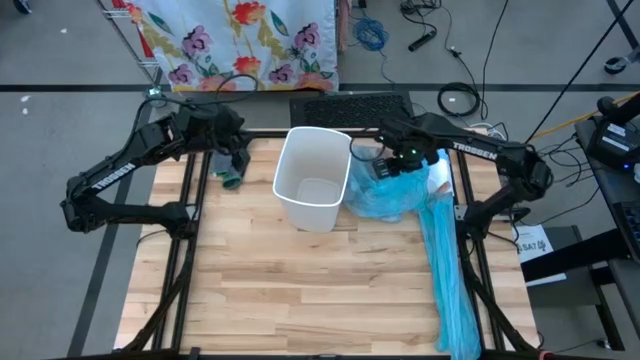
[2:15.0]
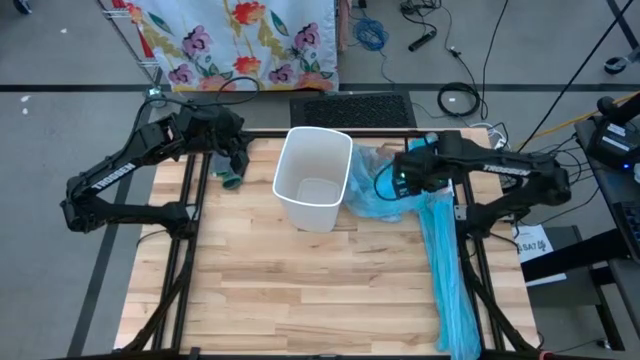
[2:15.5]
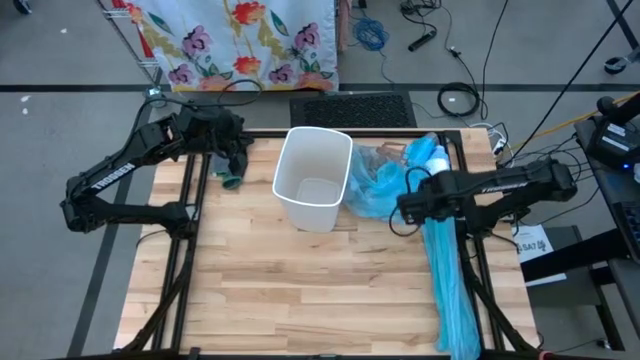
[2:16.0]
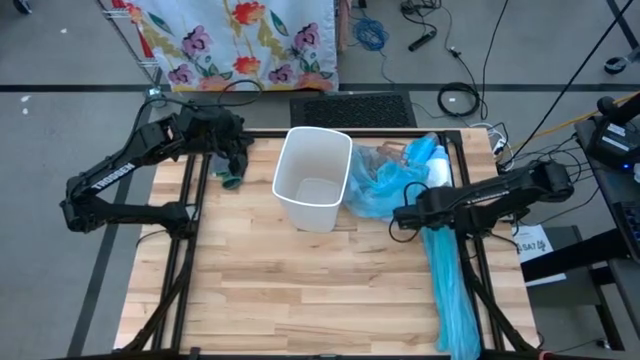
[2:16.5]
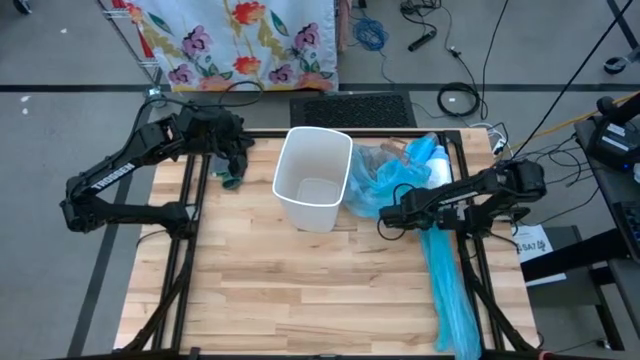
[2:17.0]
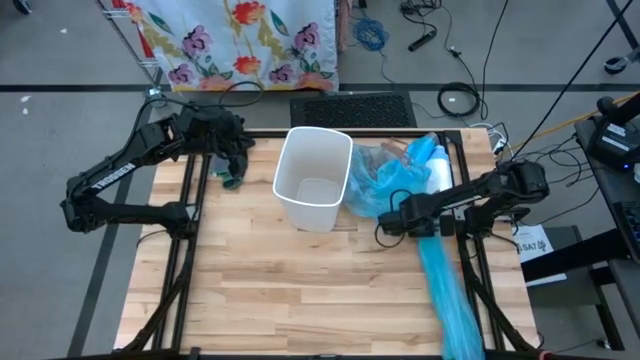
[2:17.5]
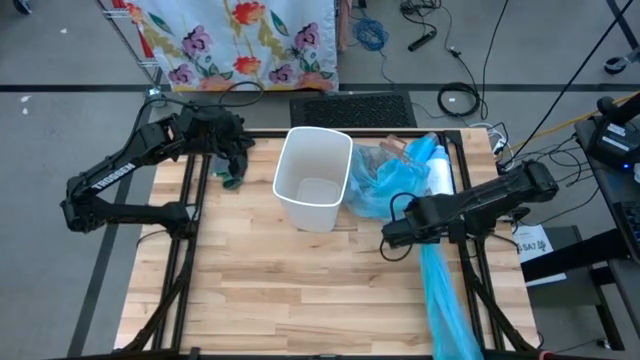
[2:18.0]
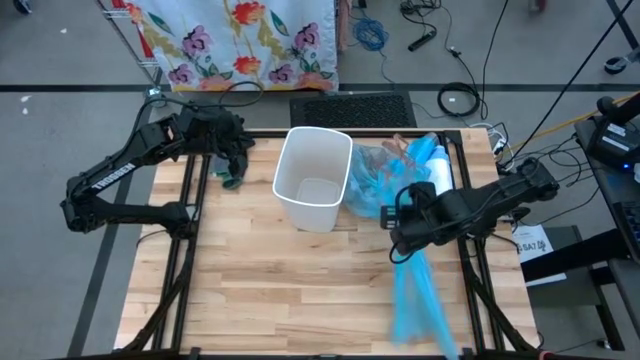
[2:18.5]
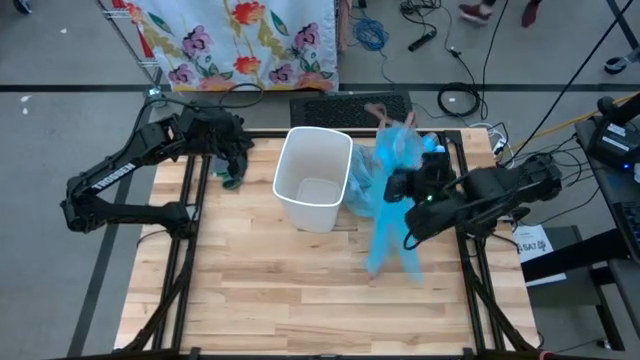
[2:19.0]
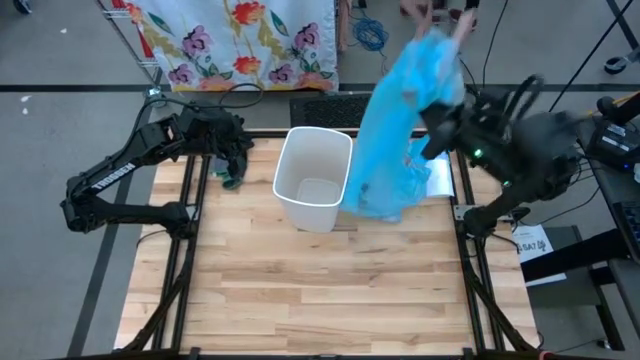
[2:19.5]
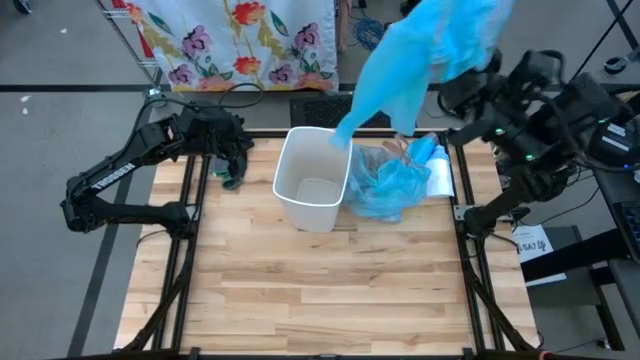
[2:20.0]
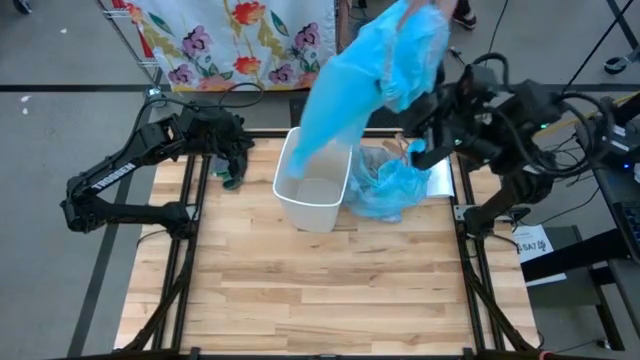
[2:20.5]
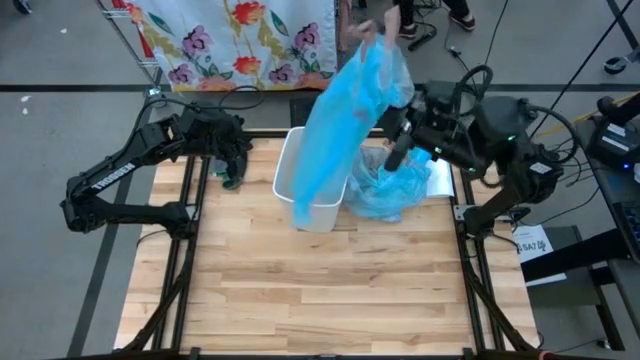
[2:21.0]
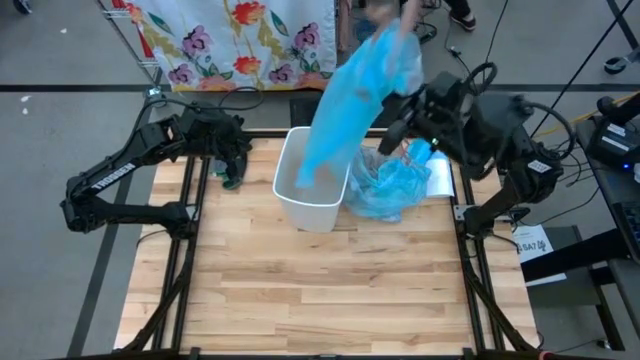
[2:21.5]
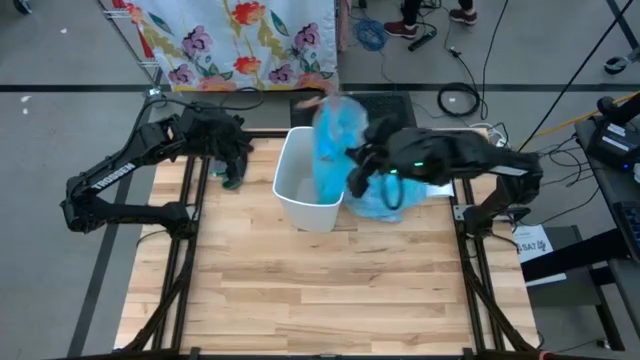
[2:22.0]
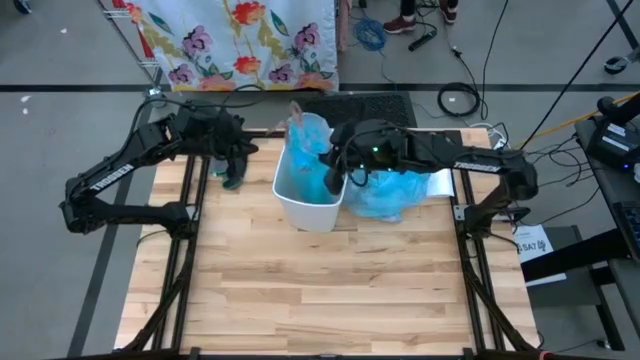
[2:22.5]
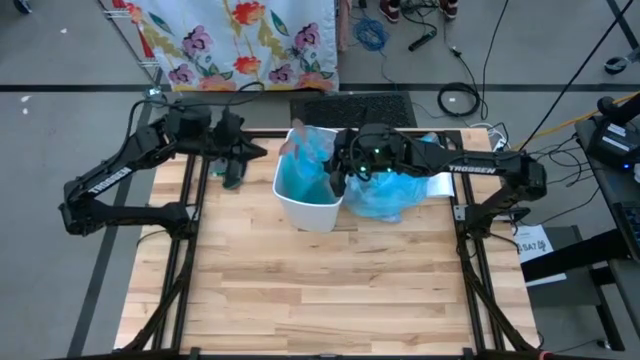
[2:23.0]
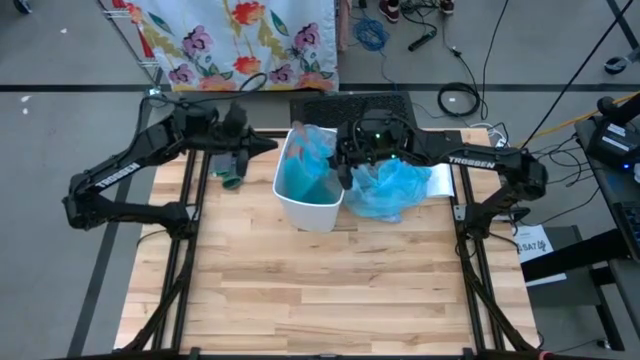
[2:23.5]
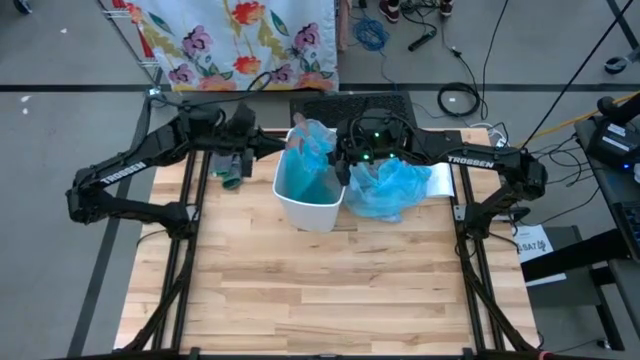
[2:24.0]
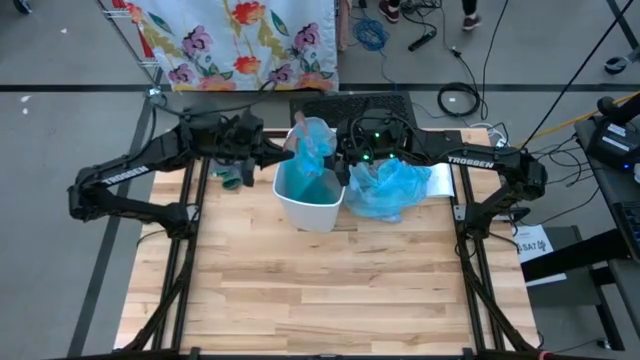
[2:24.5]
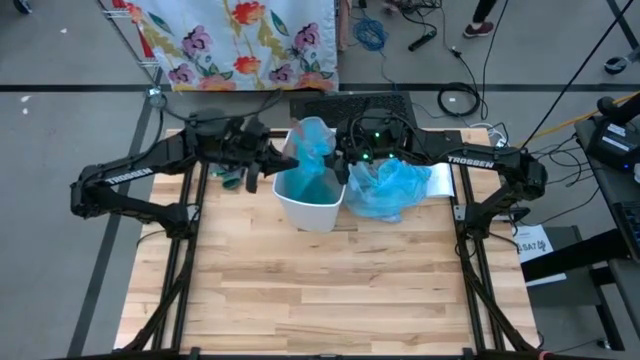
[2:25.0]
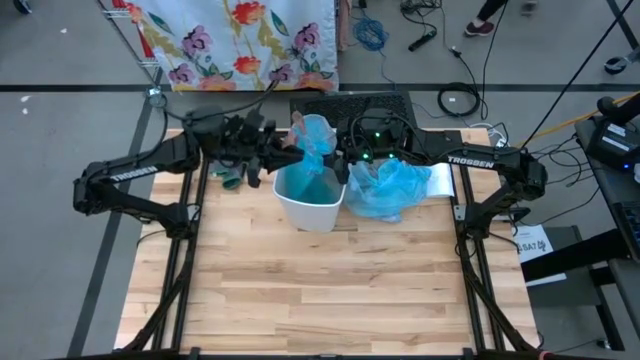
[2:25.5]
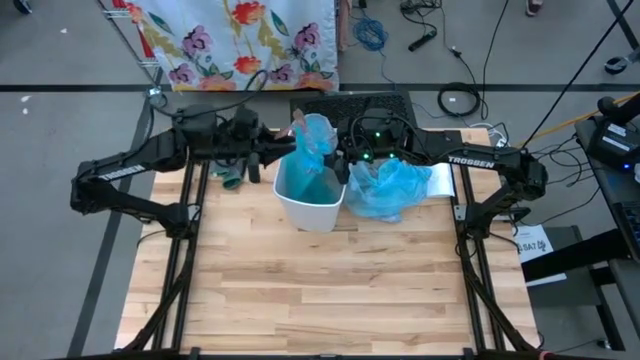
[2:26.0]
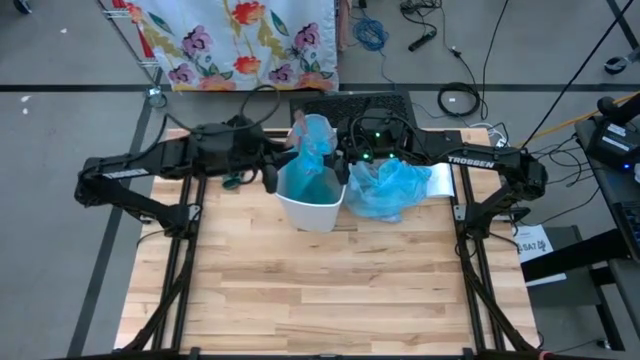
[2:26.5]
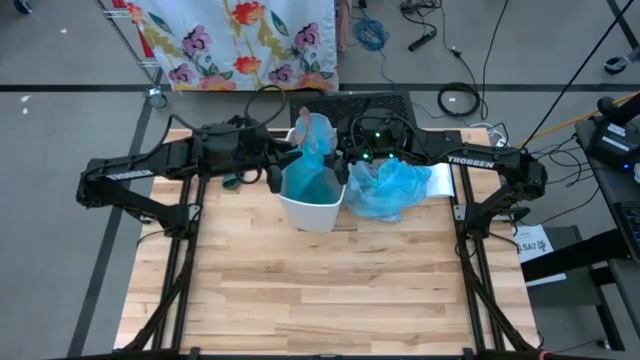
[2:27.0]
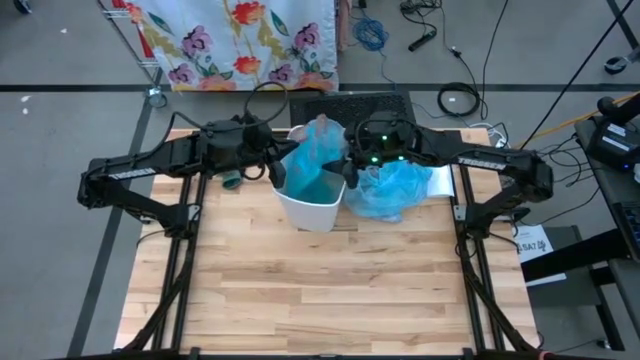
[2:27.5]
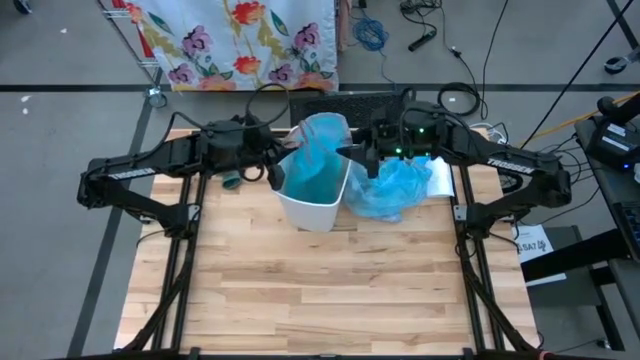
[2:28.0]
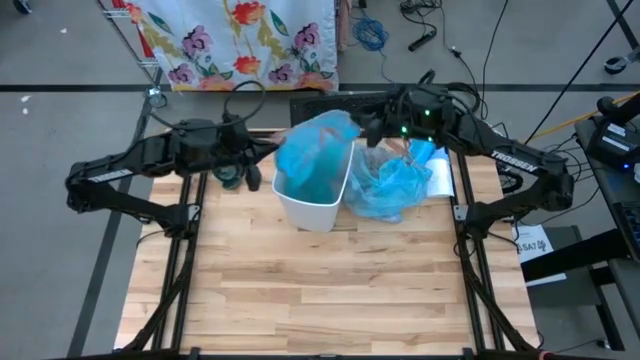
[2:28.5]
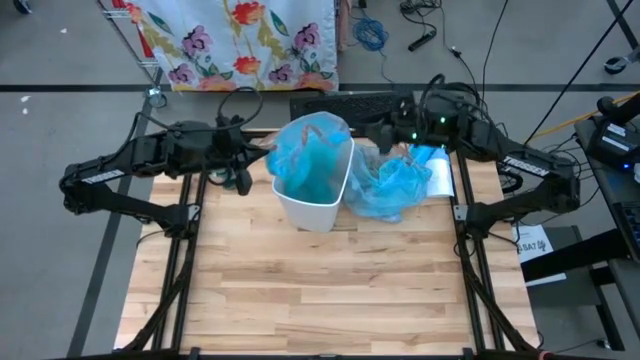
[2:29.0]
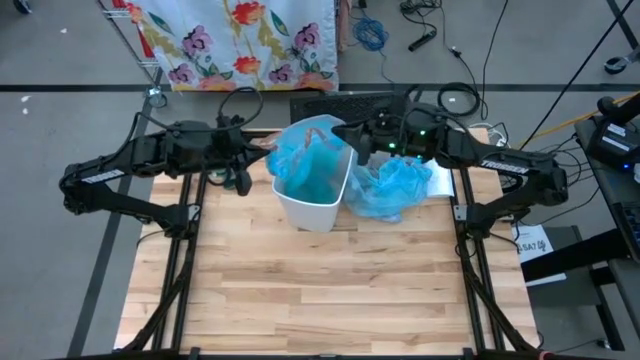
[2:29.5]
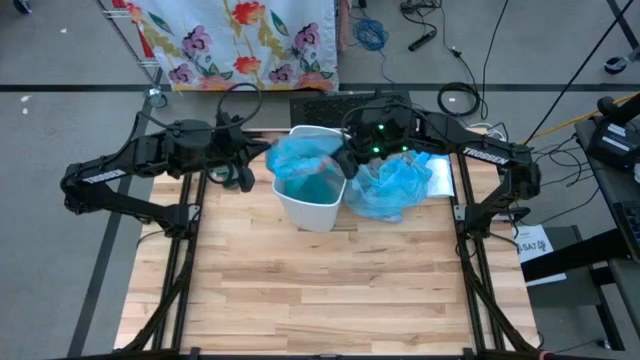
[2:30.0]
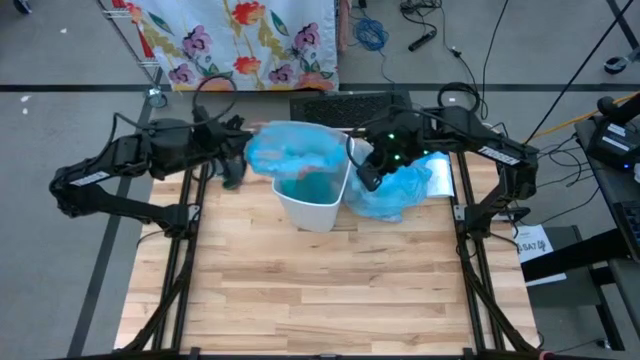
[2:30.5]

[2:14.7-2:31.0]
Task: place trash/remove bag and relplace
Insert the new blue trash bag into the trash bin

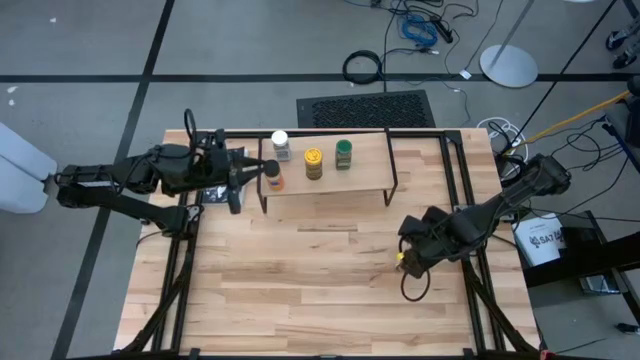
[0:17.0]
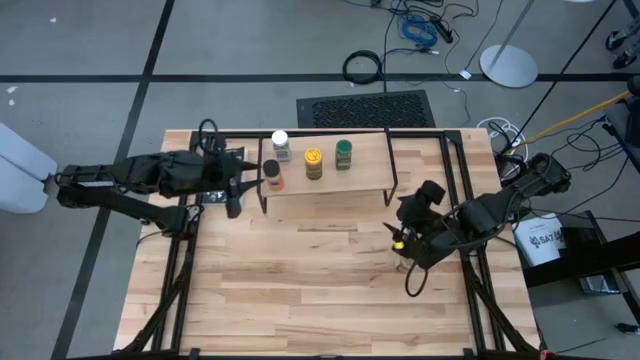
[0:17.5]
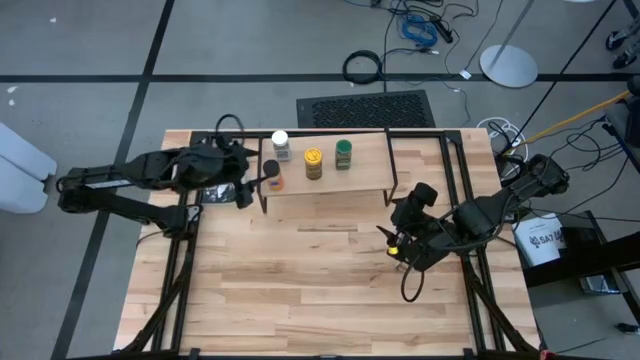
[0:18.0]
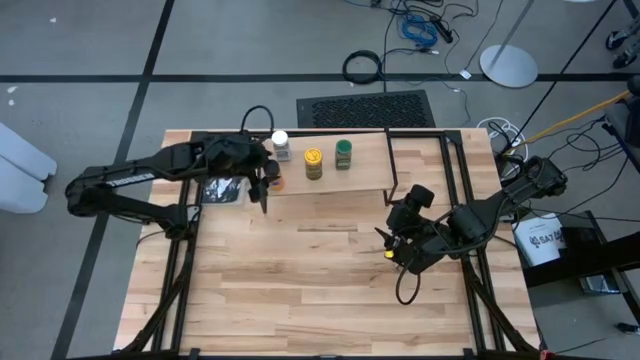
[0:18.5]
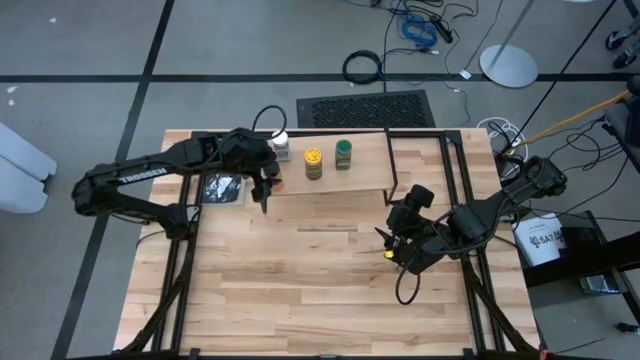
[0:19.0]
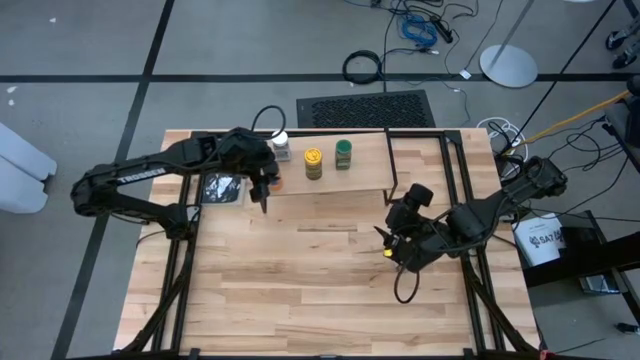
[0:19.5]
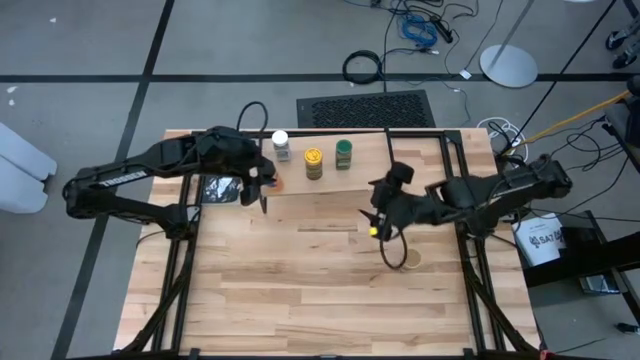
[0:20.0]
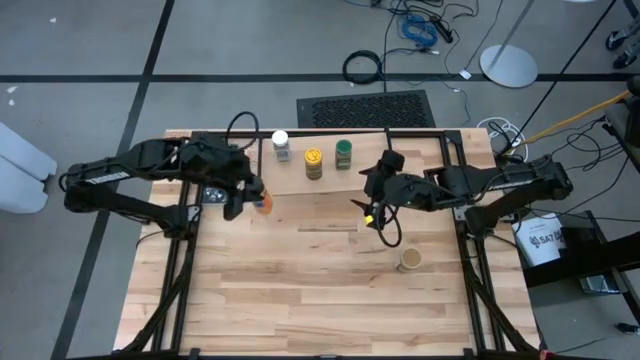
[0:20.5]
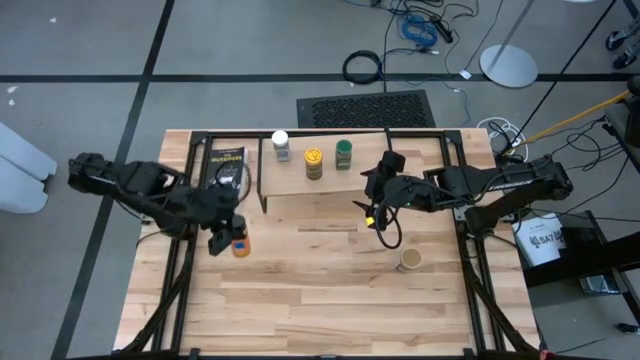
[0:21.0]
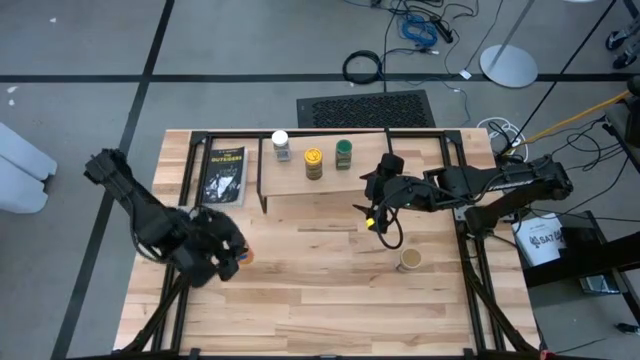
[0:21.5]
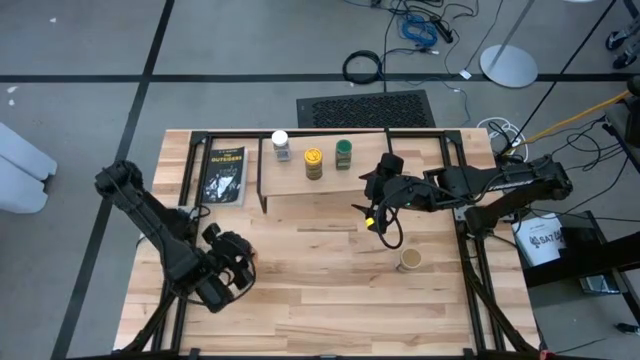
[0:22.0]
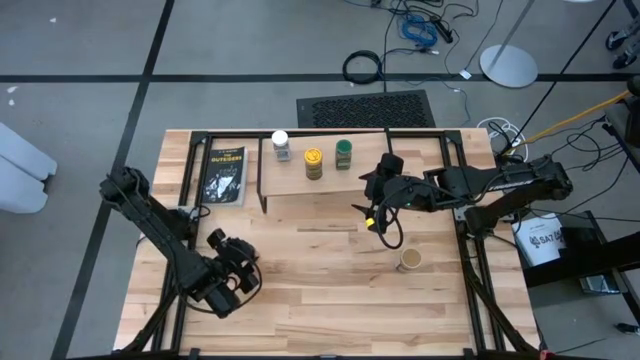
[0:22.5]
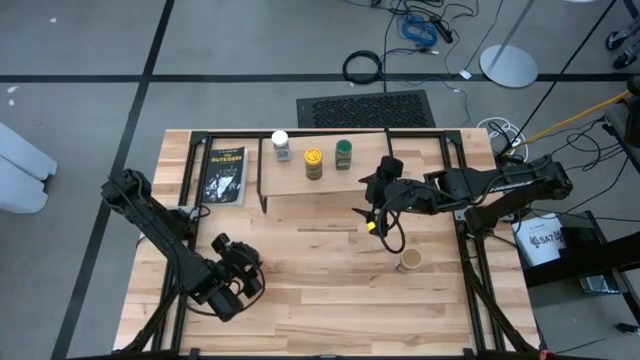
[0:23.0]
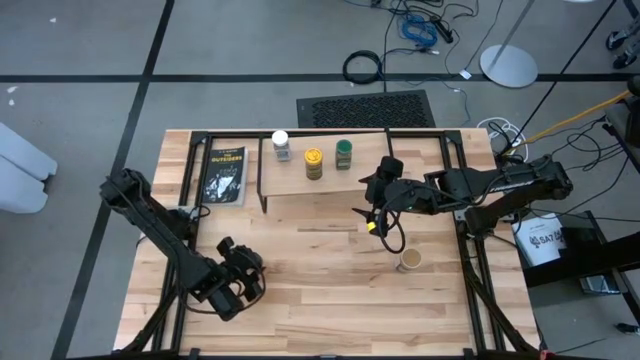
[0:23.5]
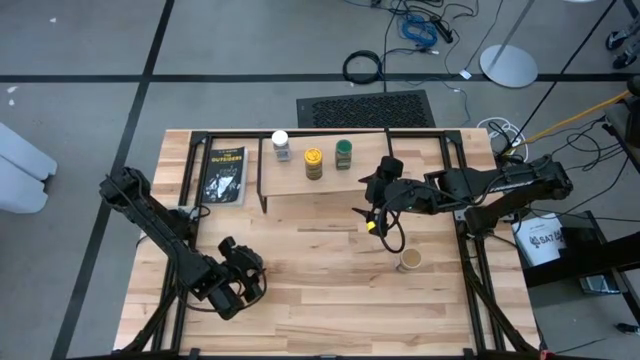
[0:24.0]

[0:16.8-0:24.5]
Task: Shelf spices
Remove the black seasoning bottle from the shelf
